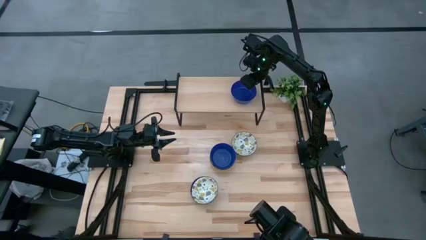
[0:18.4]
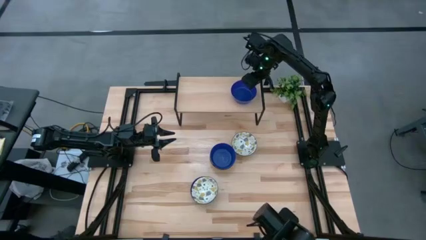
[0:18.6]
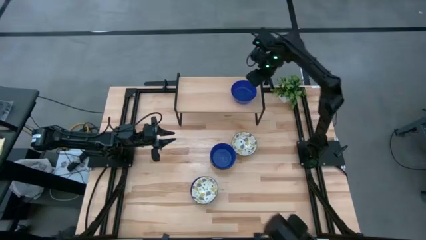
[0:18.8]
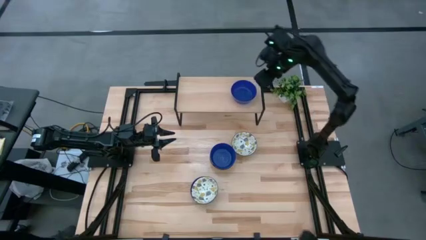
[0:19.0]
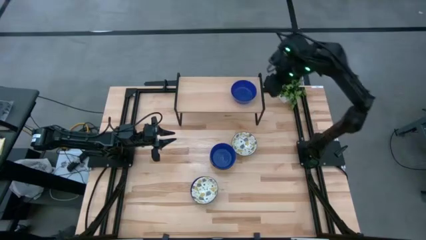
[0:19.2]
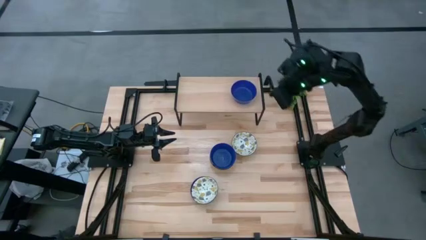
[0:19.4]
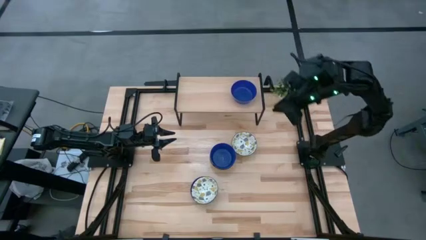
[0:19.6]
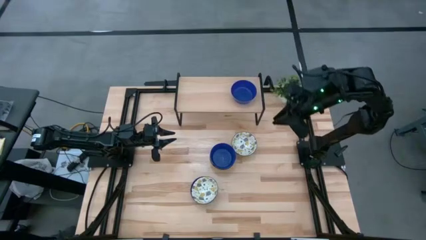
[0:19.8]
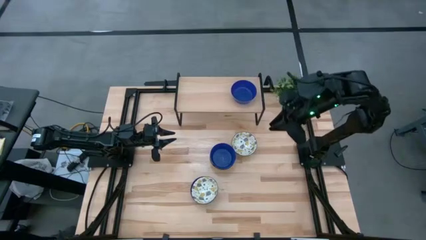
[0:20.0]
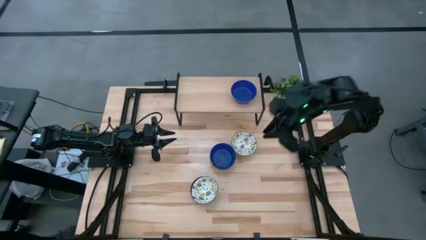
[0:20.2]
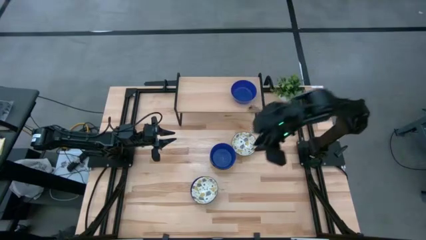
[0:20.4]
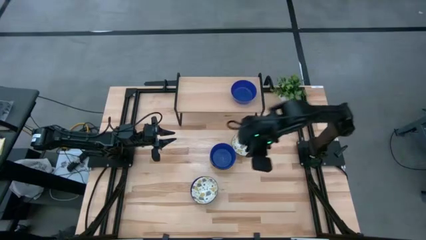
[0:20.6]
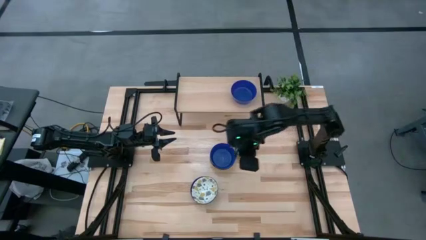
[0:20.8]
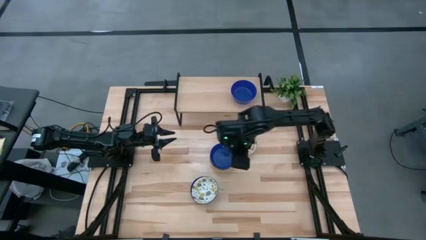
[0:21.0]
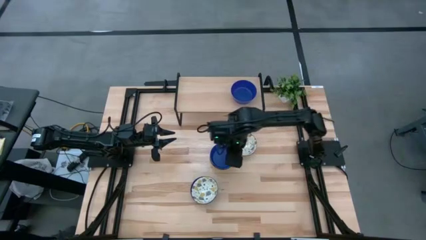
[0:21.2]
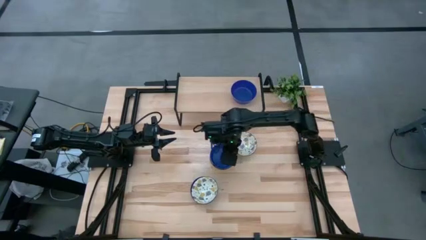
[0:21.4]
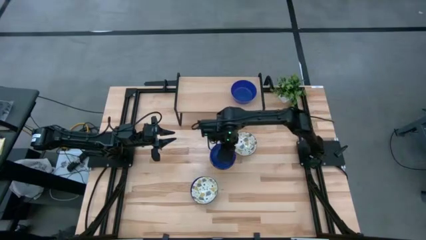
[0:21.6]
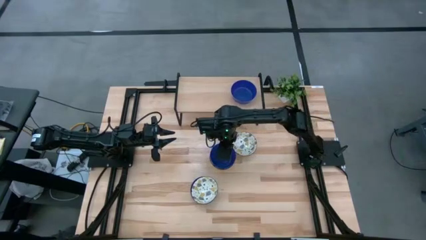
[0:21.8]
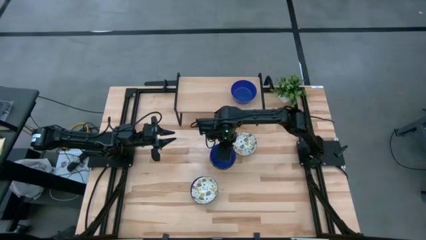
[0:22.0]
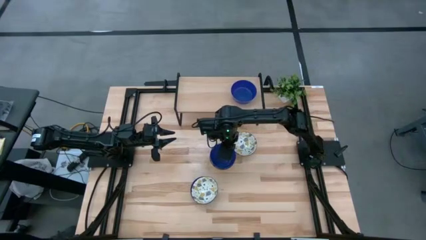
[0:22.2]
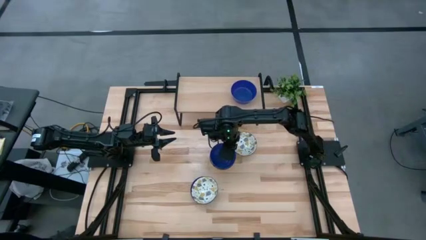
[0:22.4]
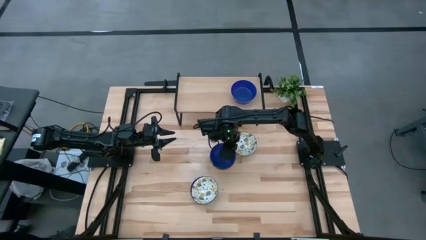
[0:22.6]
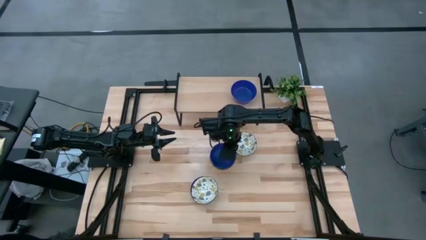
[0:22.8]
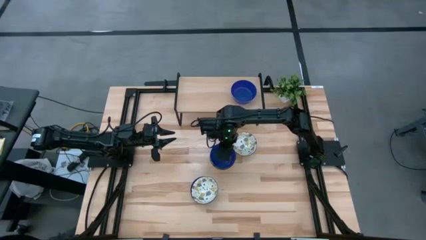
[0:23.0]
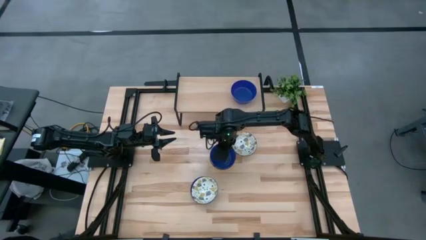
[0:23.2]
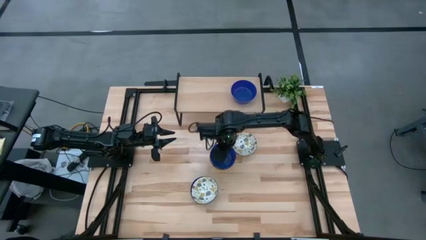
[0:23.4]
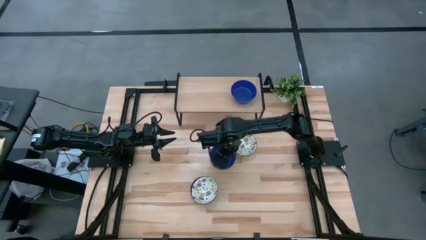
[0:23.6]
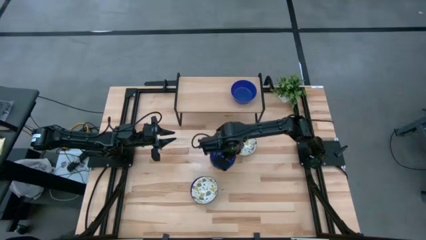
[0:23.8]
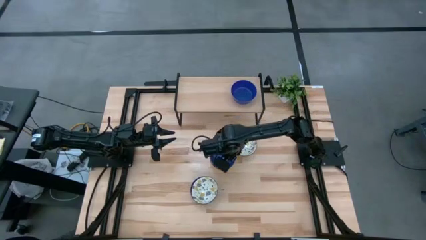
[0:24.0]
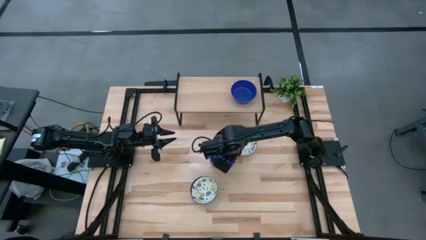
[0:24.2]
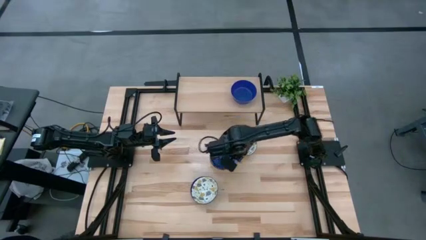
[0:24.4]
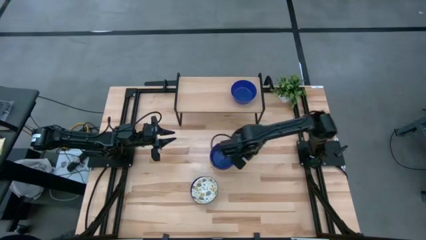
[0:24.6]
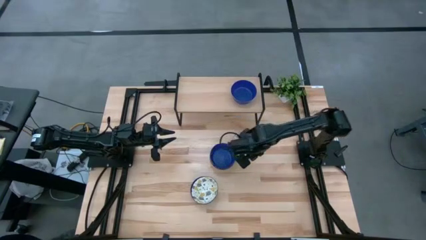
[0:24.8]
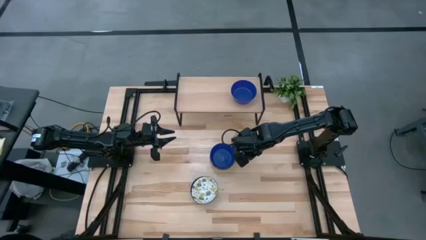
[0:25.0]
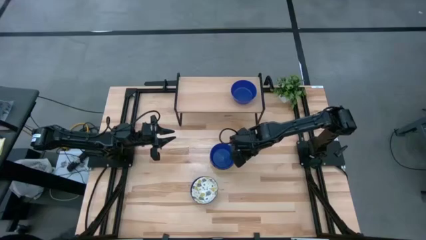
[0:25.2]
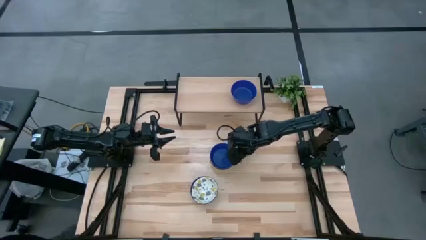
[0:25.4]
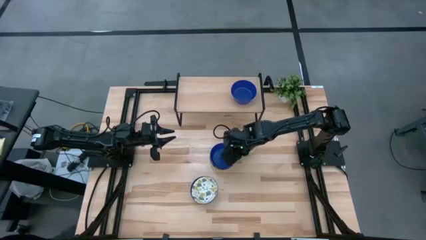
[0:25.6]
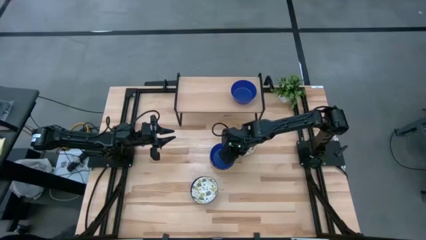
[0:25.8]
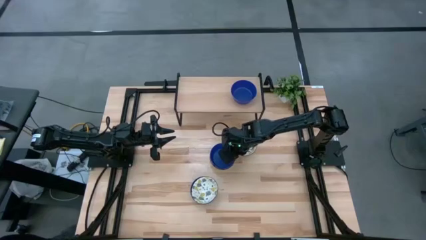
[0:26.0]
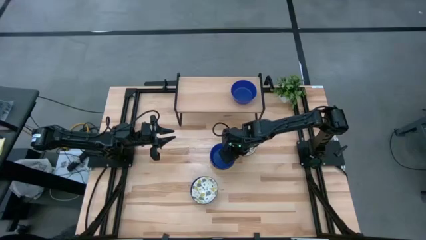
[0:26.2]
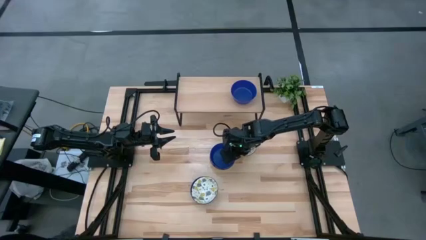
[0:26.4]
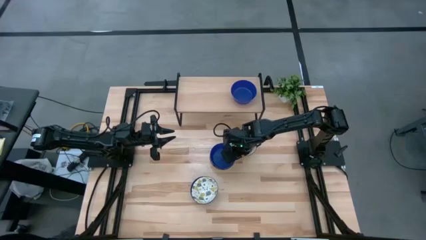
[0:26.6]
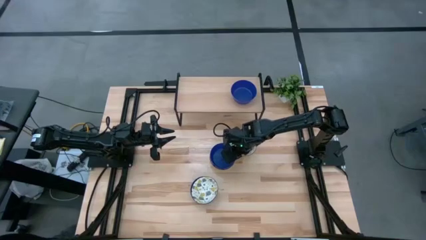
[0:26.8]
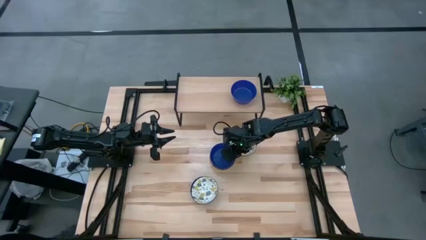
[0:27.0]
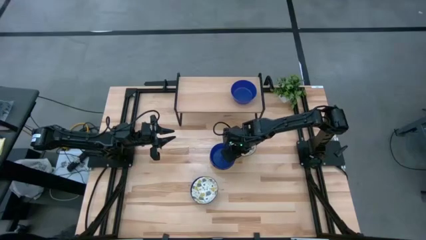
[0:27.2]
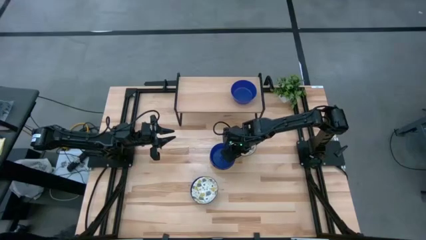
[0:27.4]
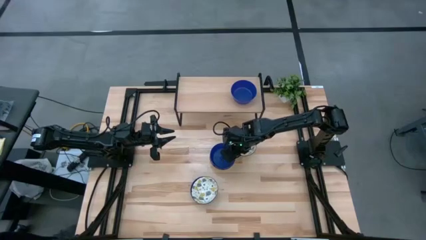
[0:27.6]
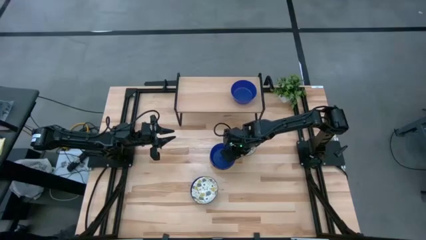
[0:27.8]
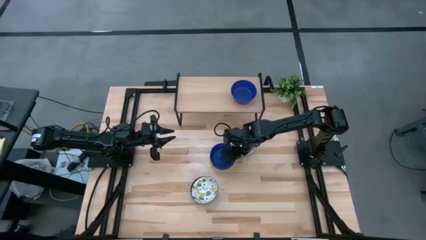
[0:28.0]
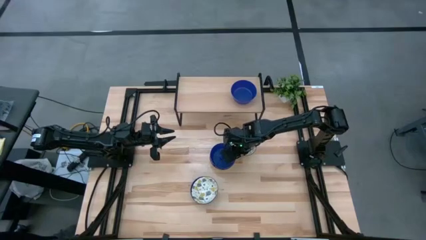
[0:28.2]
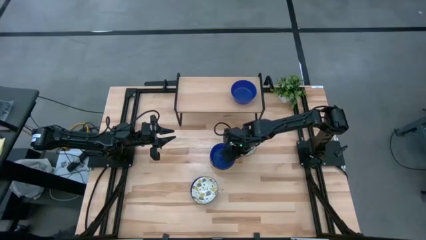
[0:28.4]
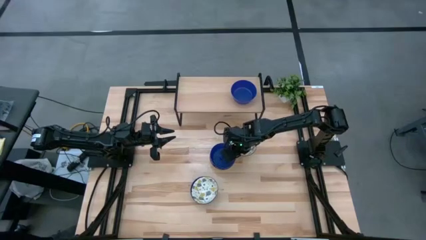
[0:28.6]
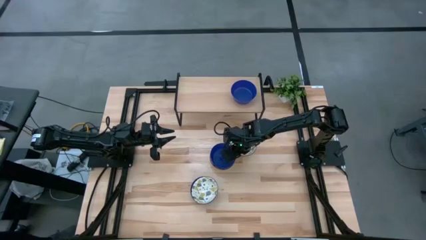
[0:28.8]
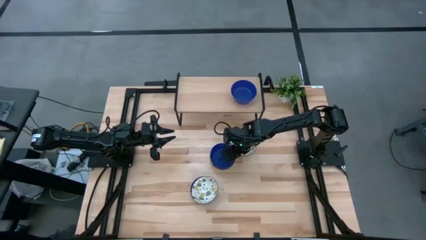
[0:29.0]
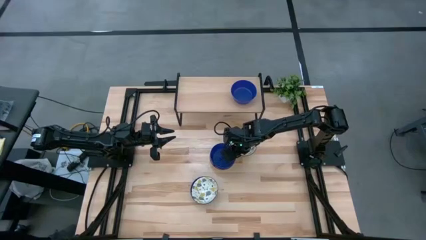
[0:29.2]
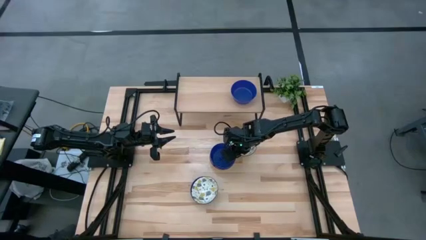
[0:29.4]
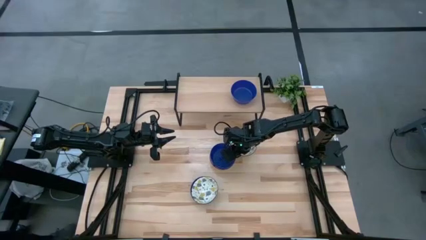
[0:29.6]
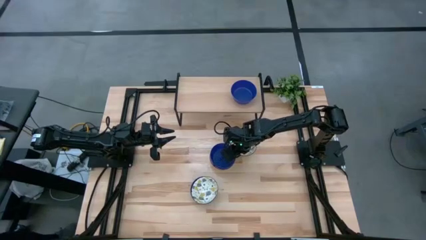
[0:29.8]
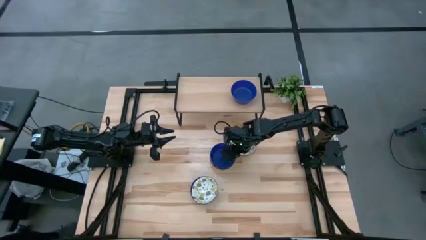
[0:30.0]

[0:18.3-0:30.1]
Task: Pick & Place Mini bowls
Stack the top blue bowl on top of the blue bowl on the shelf
